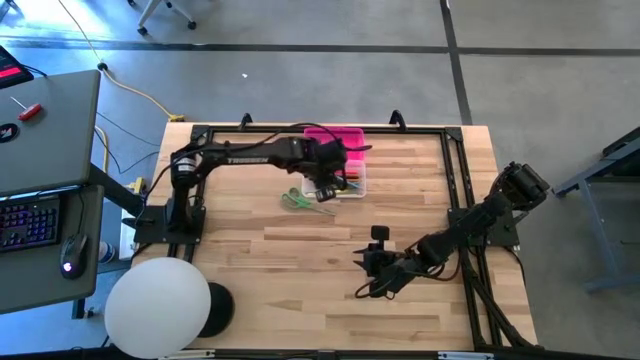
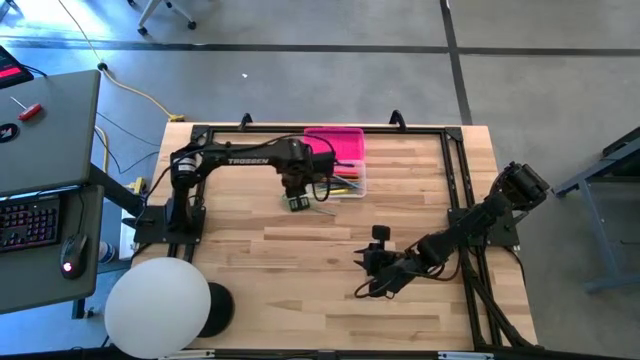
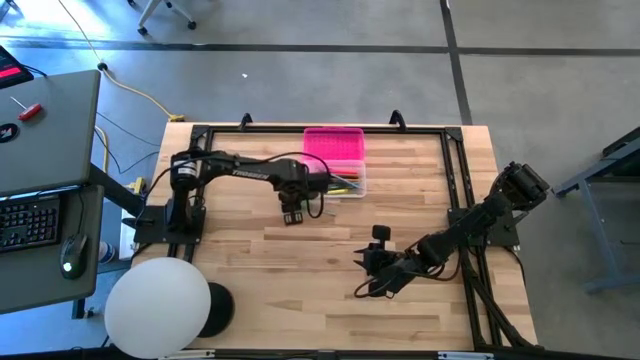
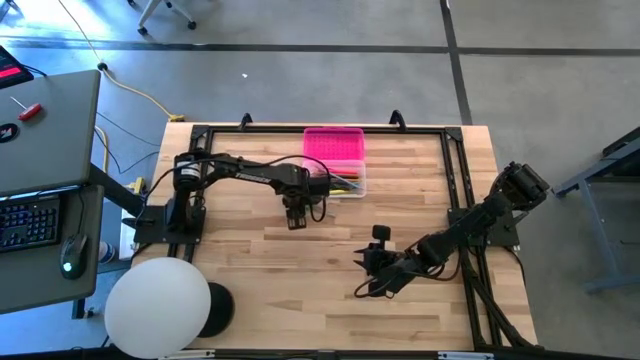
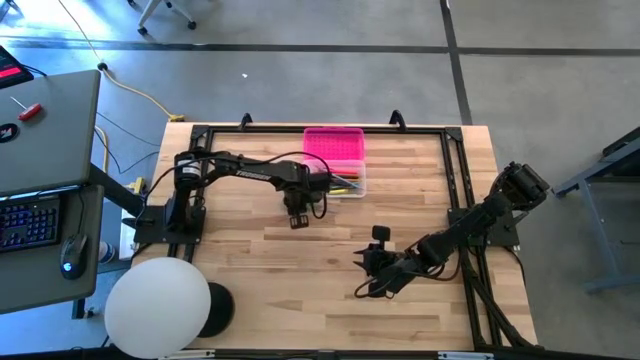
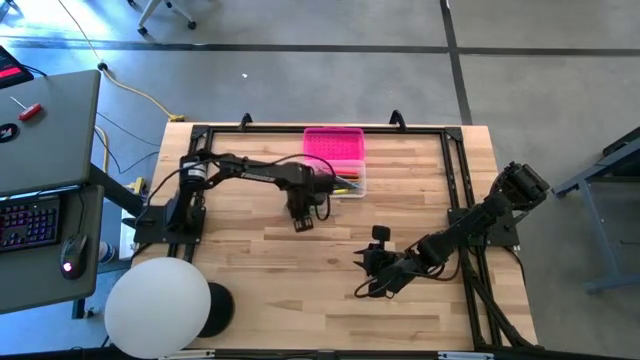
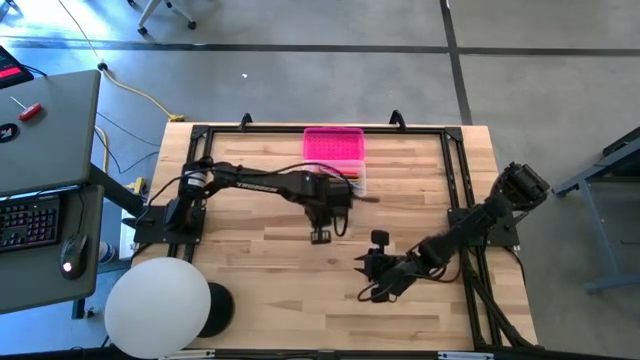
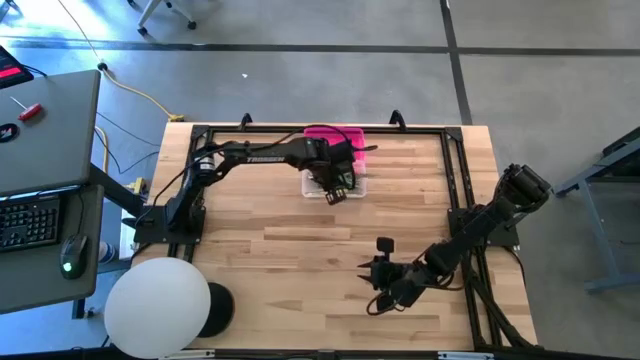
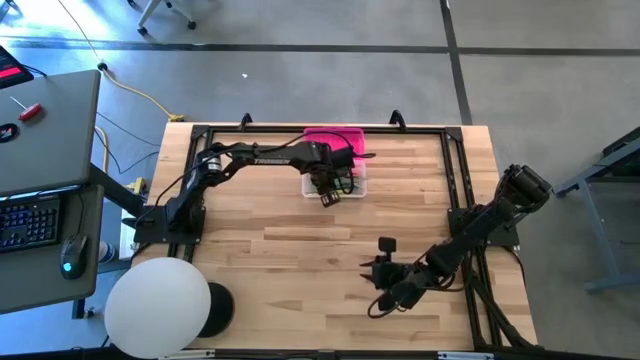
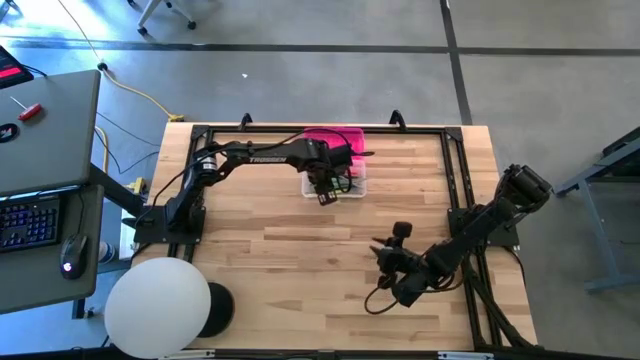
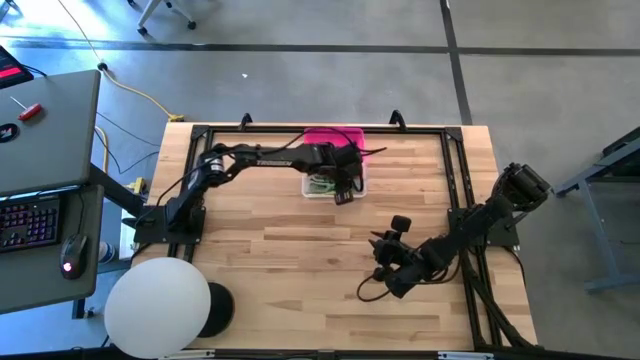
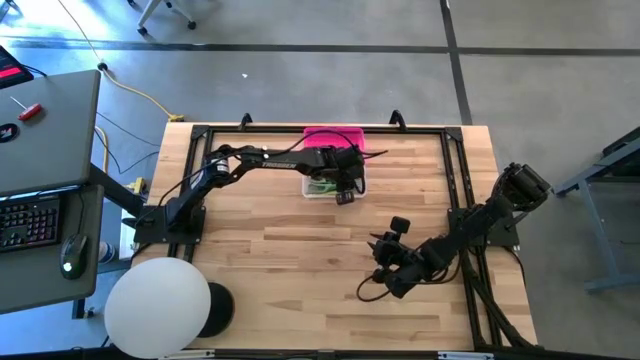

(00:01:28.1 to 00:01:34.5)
Task: Pick & place school supplies into a supply box
Put the scissors into the supply box

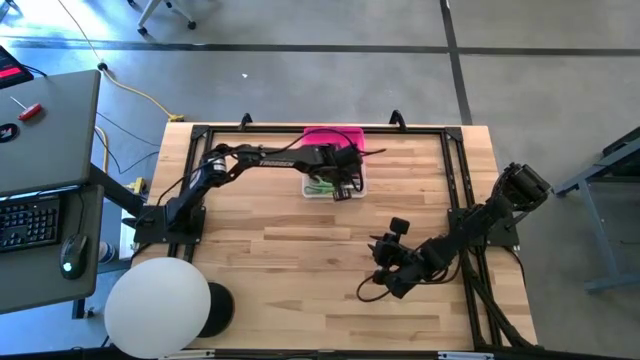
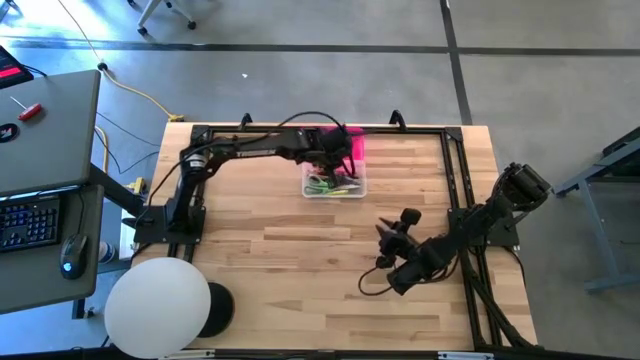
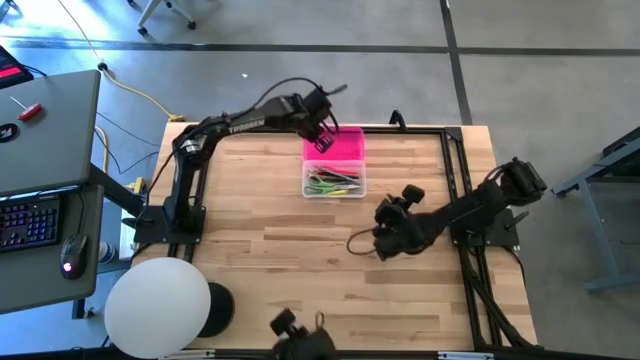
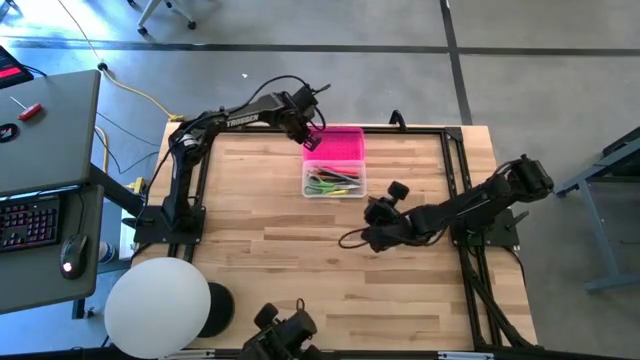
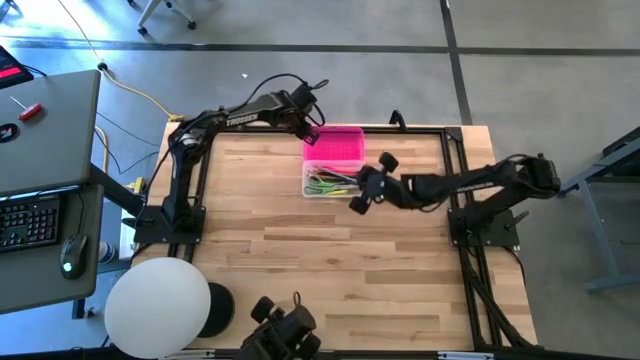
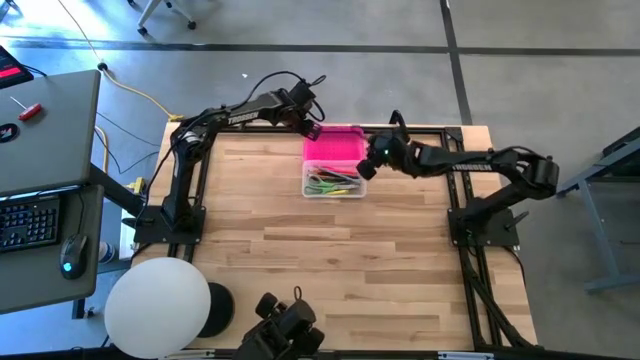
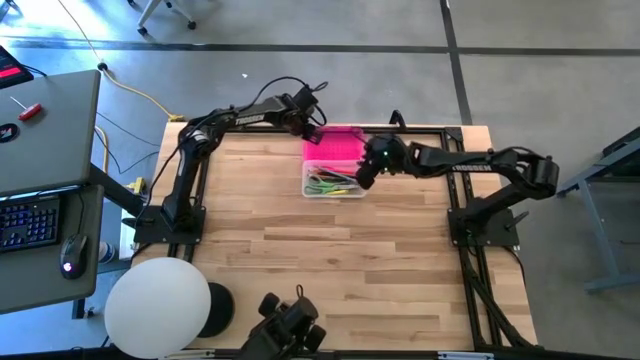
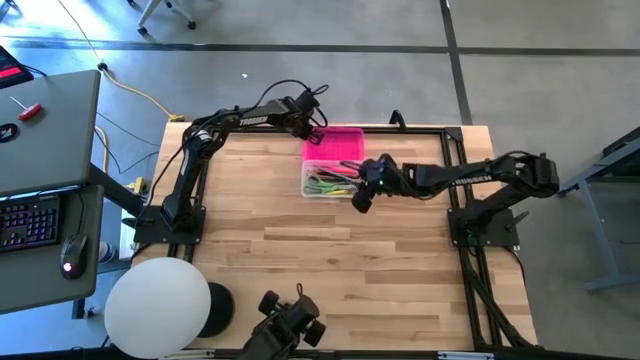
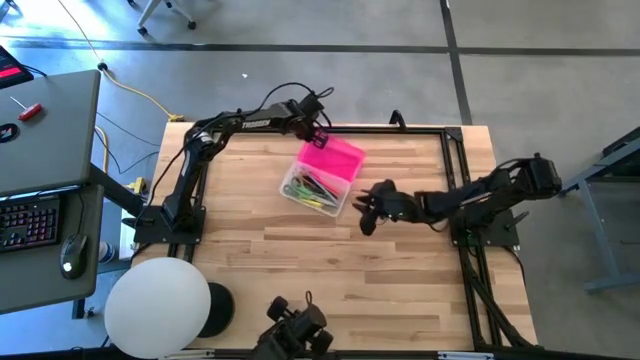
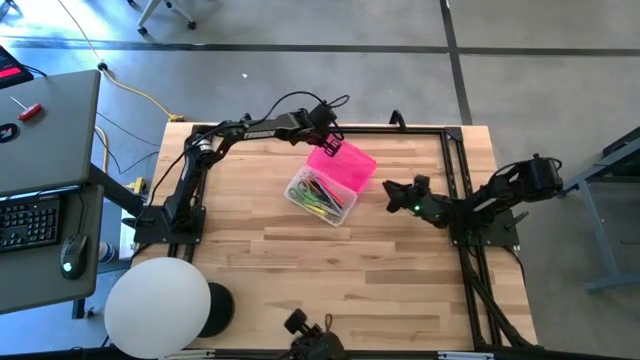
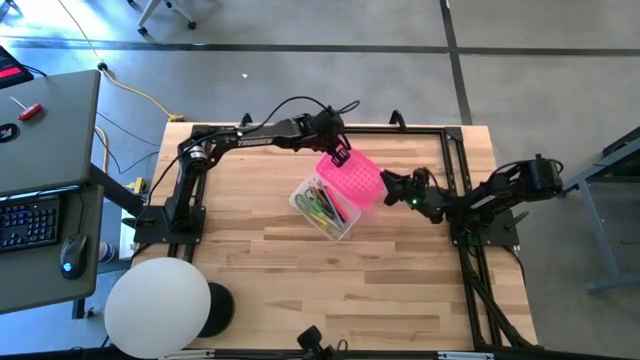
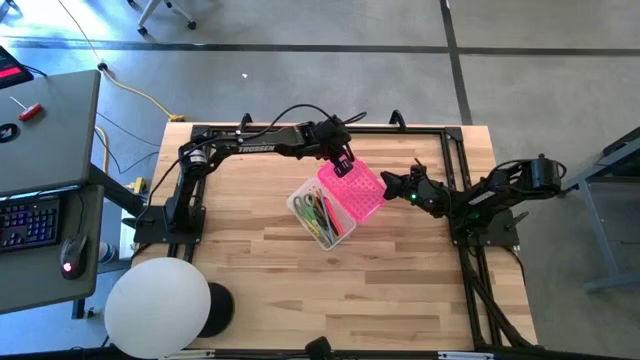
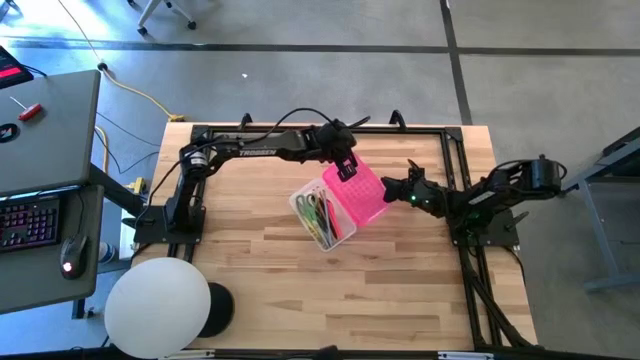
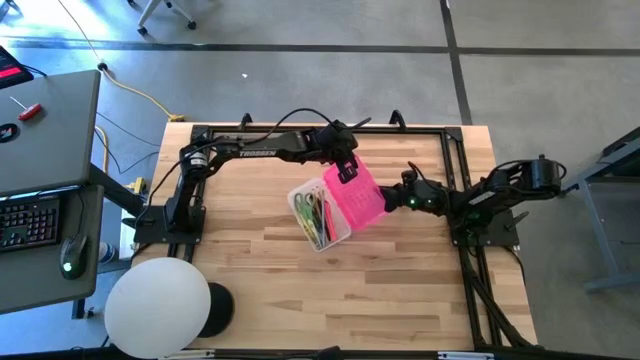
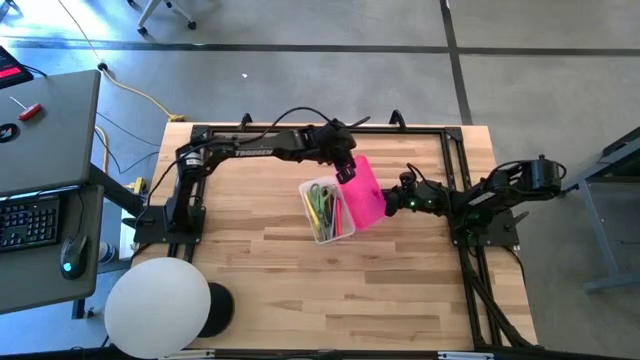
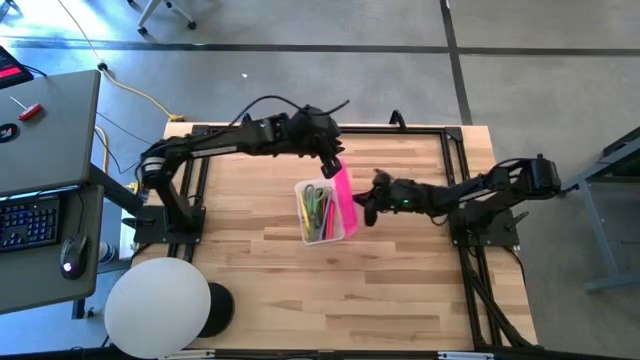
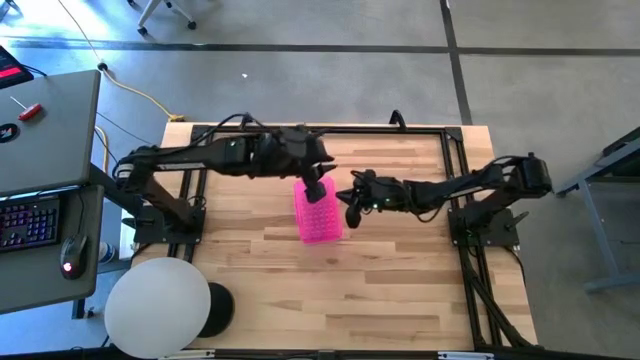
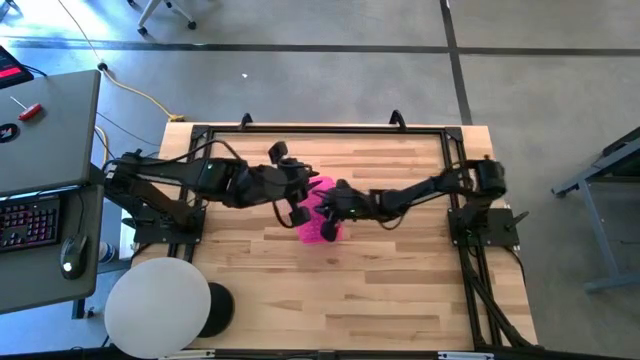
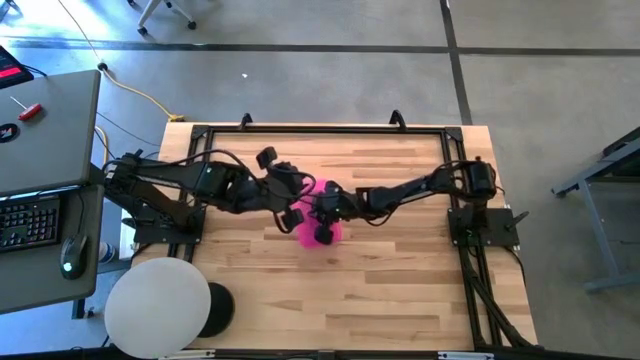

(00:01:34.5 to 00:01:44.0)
Close the supply box

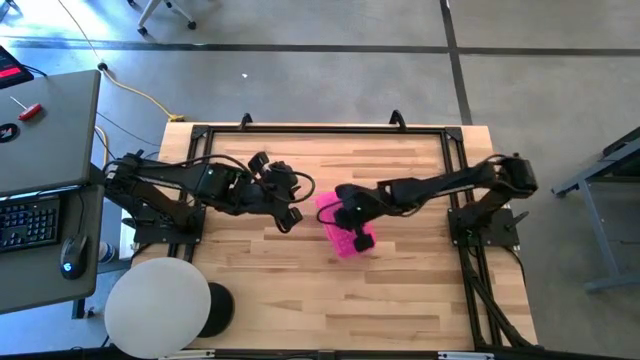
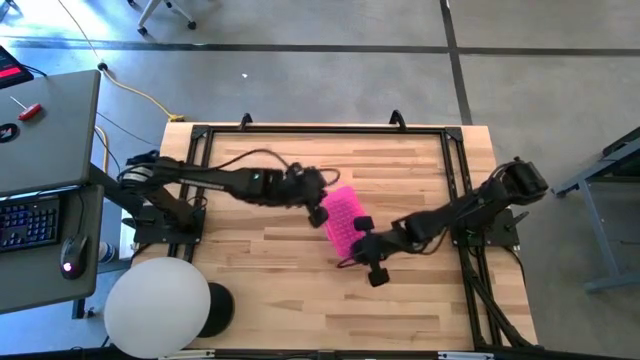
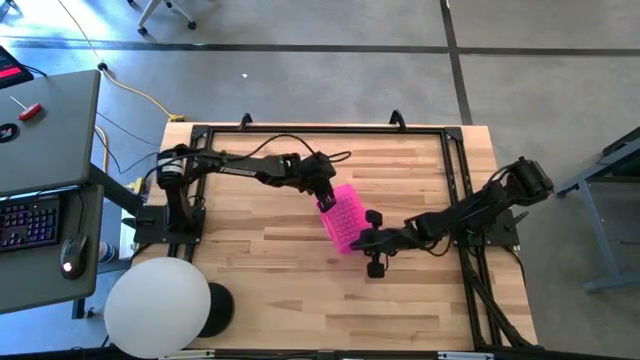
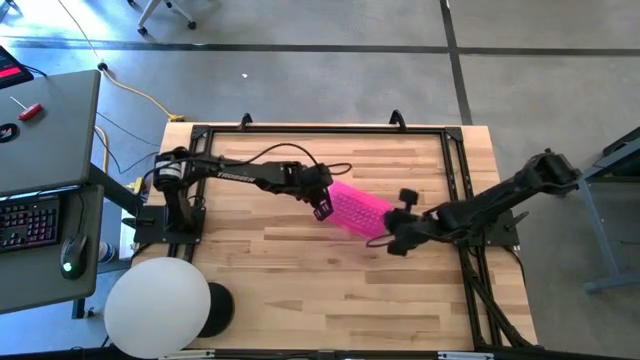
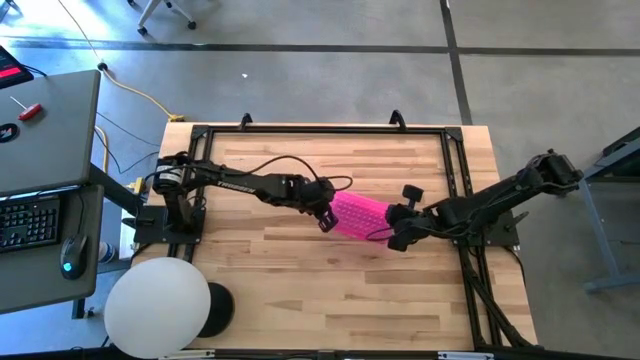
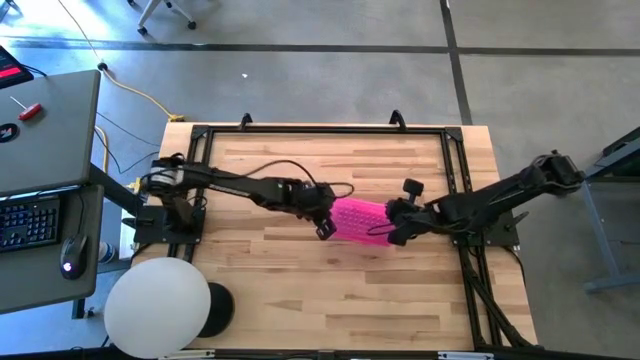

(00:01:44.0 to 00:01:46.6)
Adjust the supply box

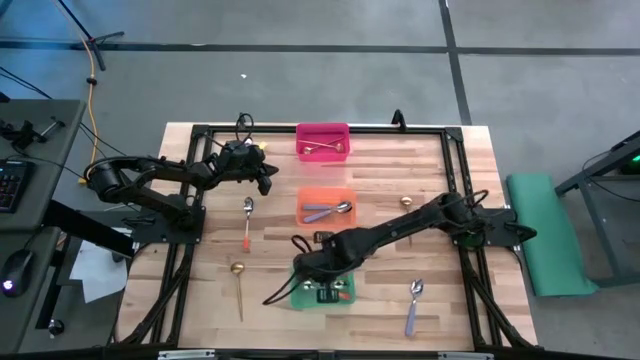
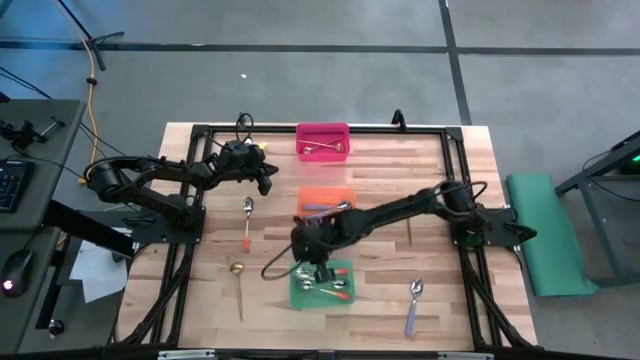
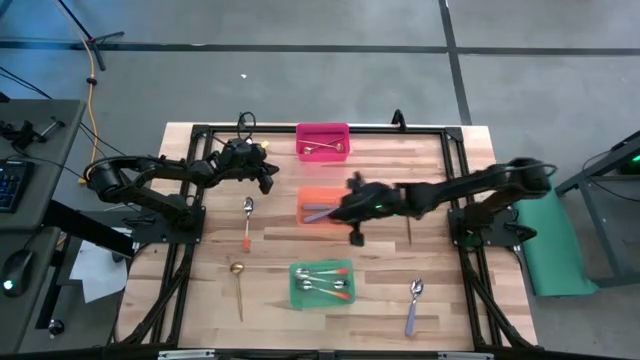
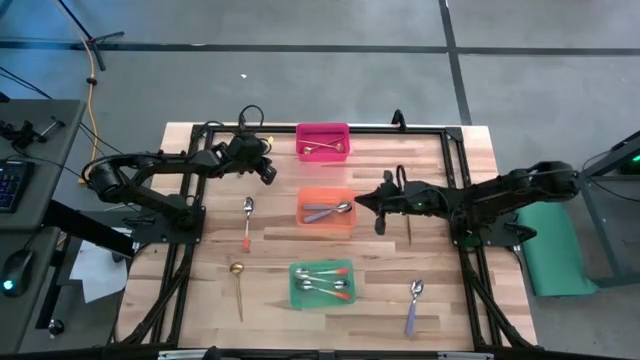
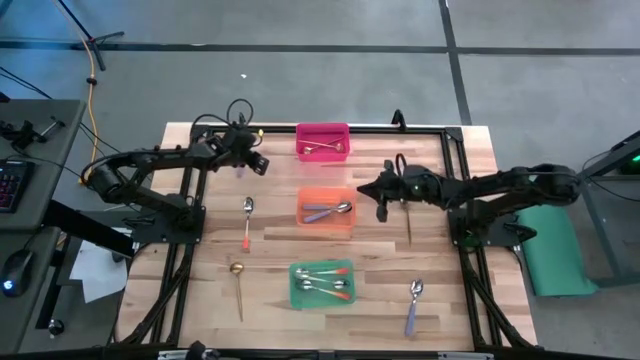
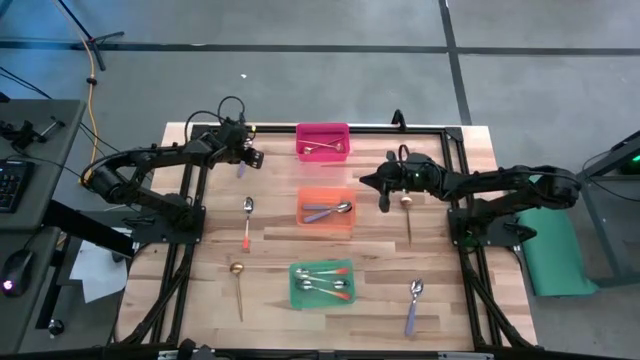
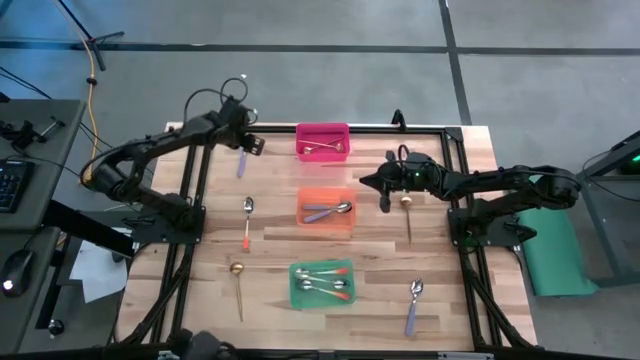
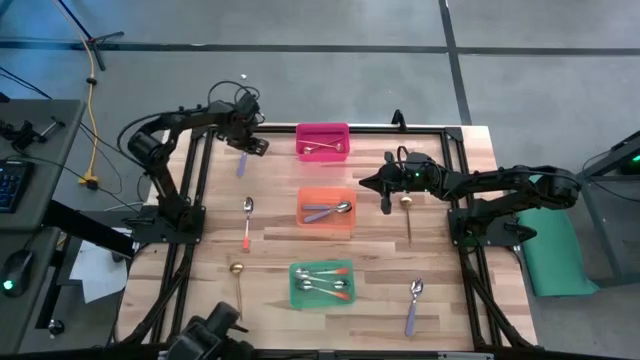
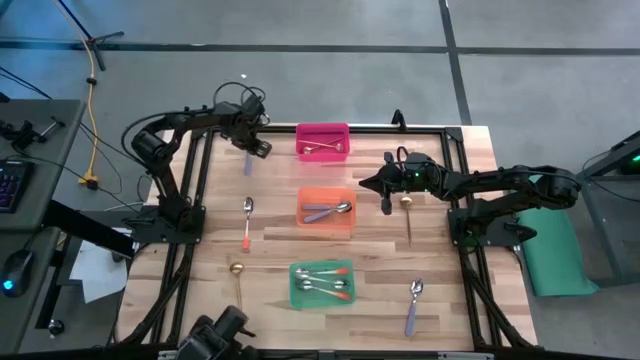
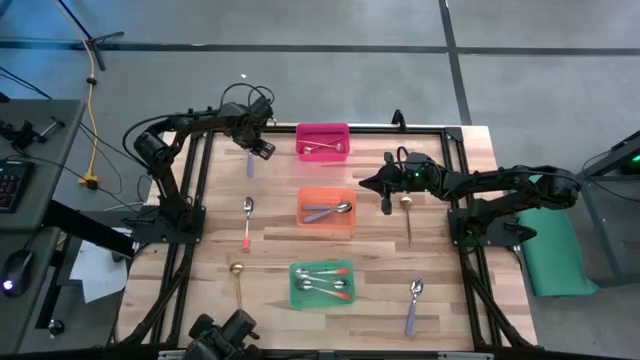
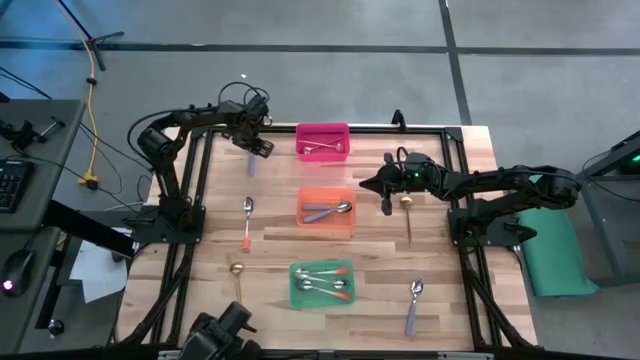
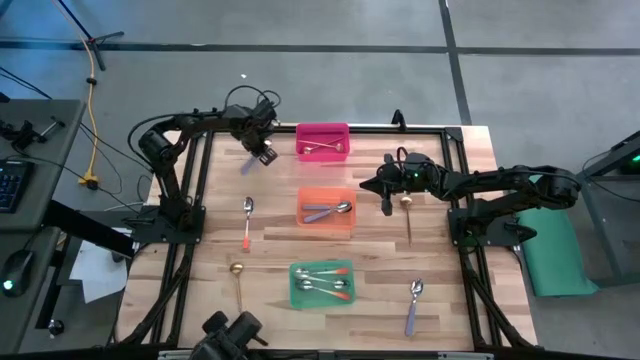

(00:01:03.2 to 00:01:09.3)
Task: Sort silverware by color (type)
Put the top violet spoon into the orange bin
